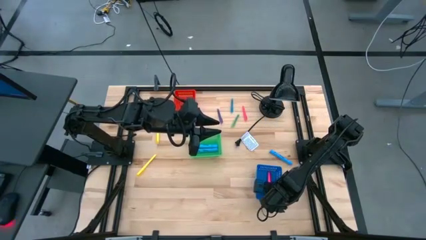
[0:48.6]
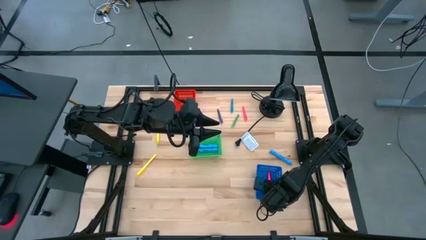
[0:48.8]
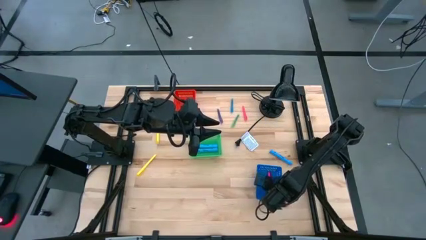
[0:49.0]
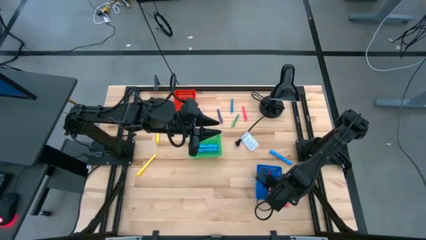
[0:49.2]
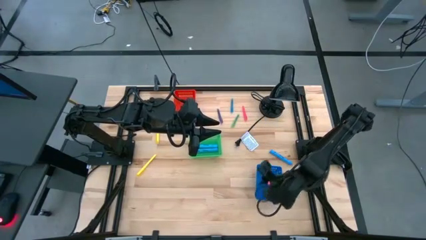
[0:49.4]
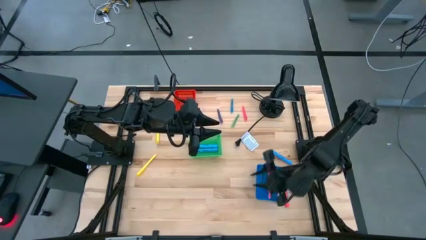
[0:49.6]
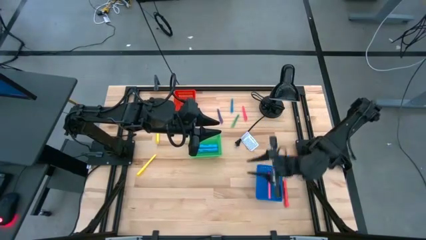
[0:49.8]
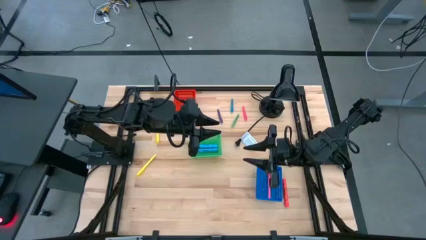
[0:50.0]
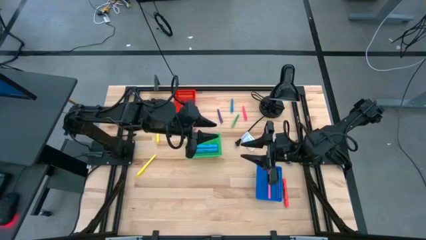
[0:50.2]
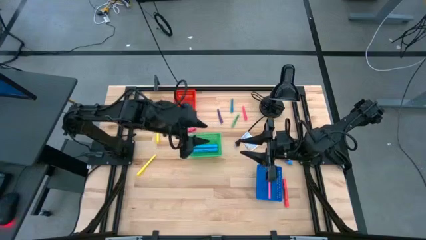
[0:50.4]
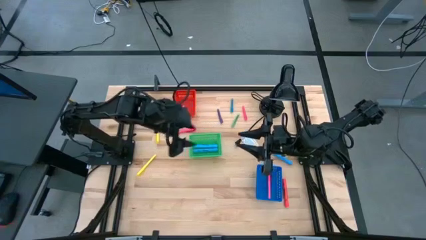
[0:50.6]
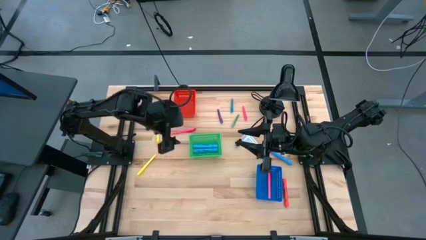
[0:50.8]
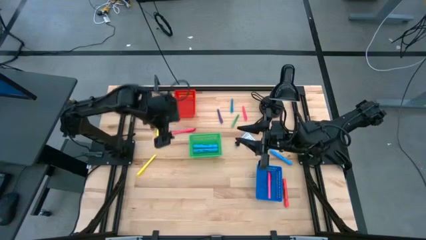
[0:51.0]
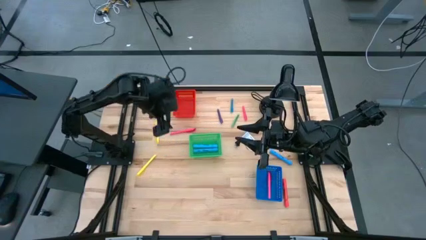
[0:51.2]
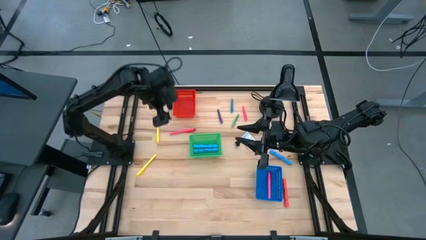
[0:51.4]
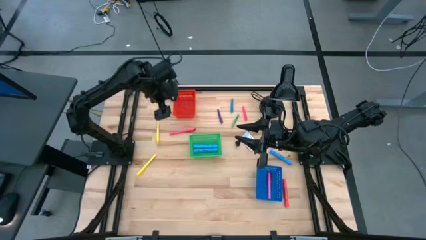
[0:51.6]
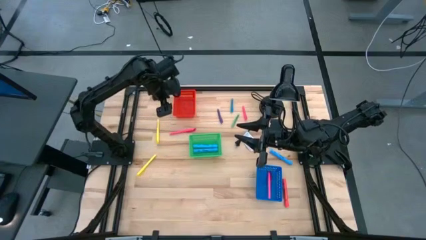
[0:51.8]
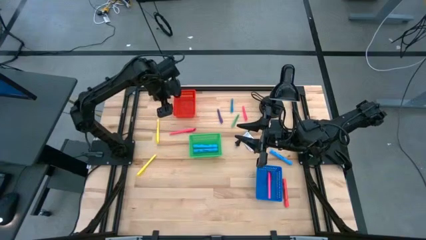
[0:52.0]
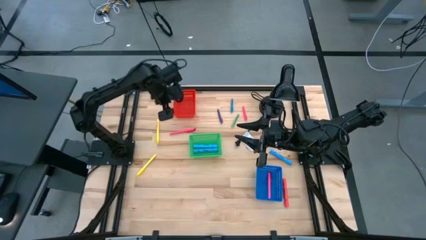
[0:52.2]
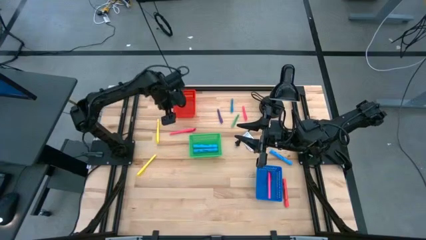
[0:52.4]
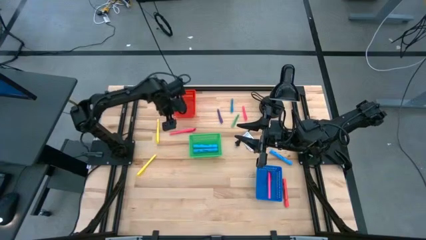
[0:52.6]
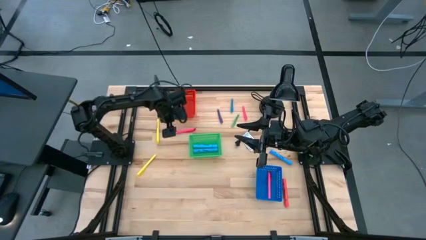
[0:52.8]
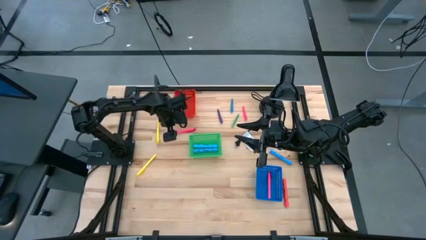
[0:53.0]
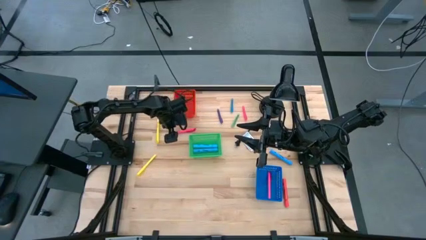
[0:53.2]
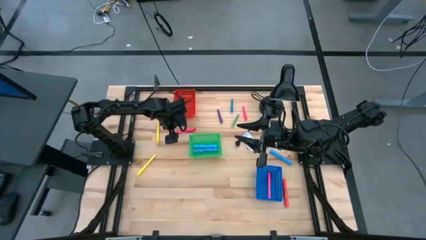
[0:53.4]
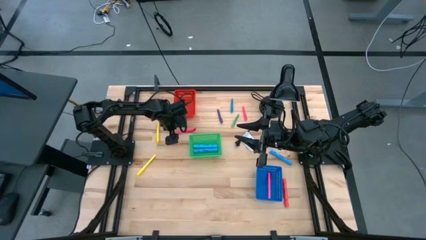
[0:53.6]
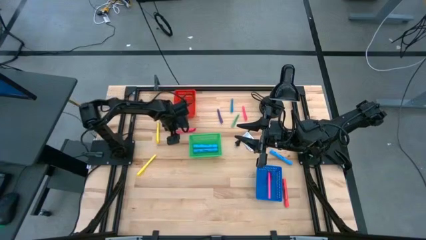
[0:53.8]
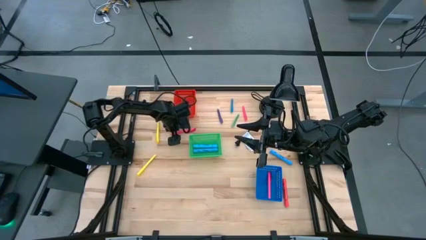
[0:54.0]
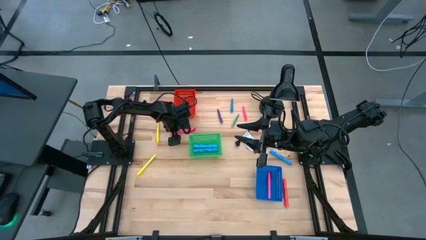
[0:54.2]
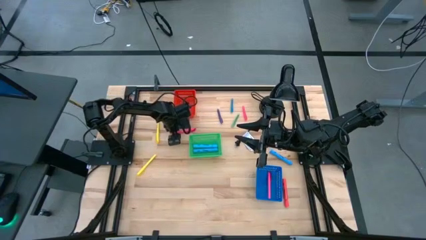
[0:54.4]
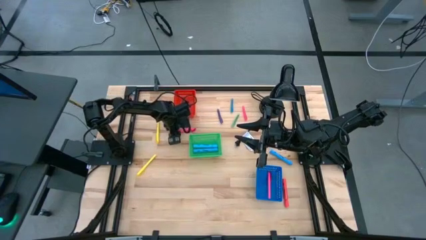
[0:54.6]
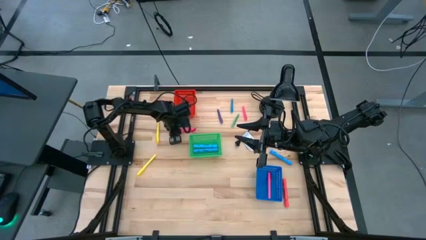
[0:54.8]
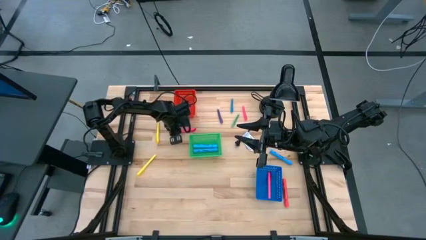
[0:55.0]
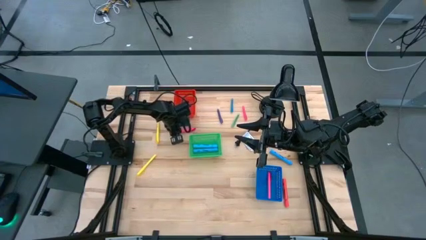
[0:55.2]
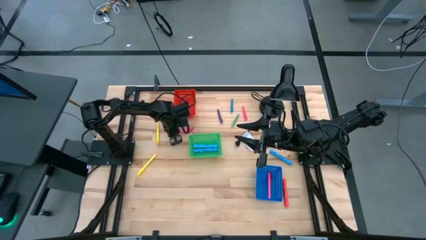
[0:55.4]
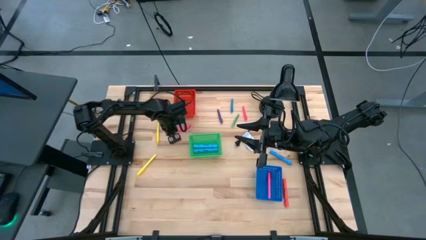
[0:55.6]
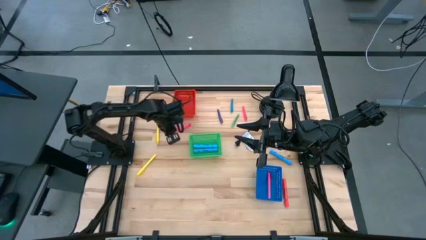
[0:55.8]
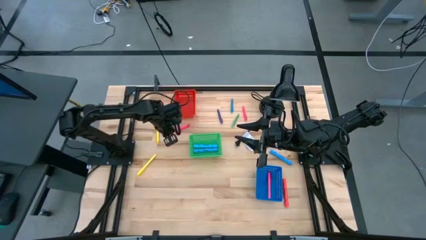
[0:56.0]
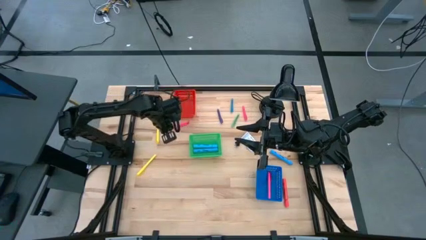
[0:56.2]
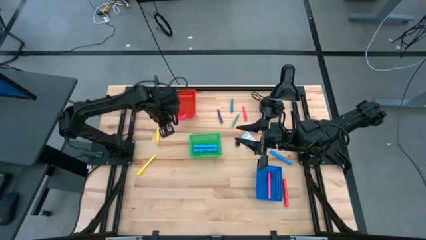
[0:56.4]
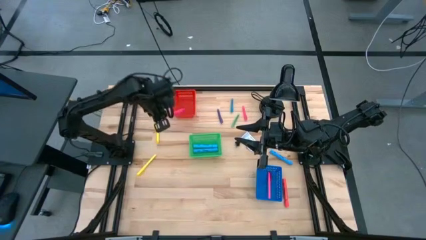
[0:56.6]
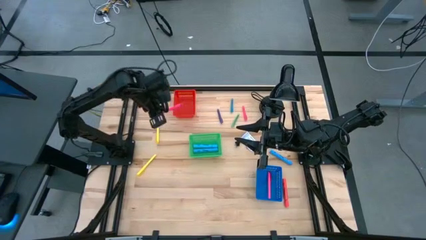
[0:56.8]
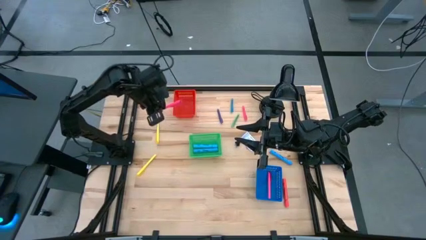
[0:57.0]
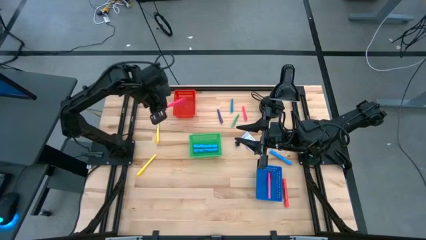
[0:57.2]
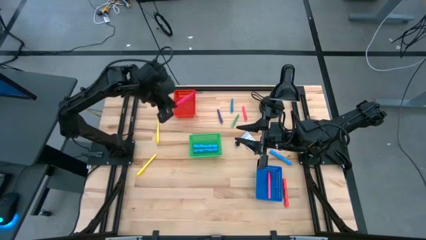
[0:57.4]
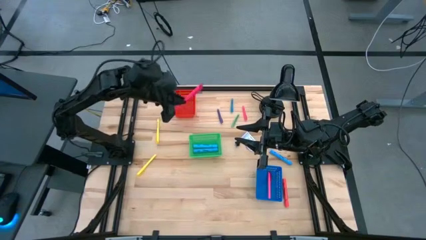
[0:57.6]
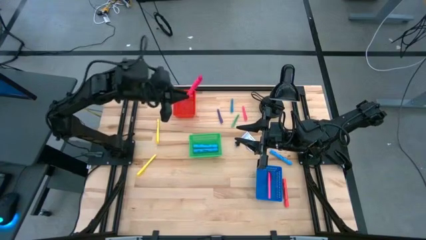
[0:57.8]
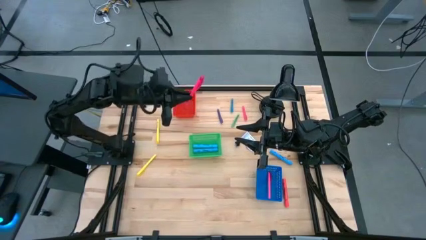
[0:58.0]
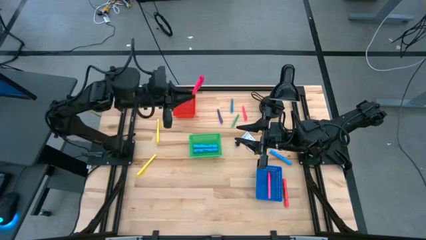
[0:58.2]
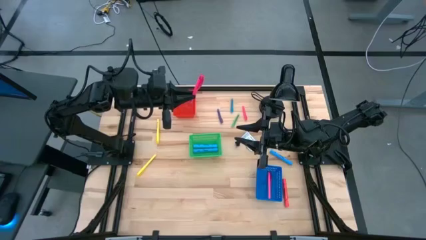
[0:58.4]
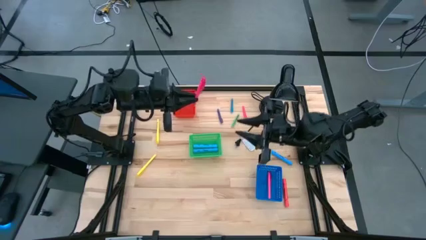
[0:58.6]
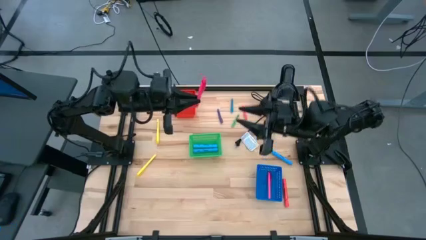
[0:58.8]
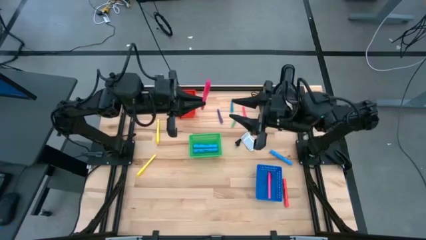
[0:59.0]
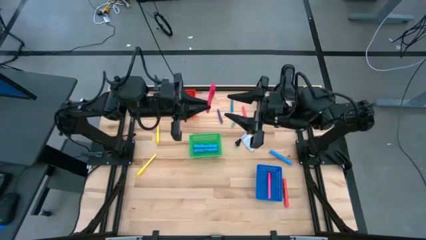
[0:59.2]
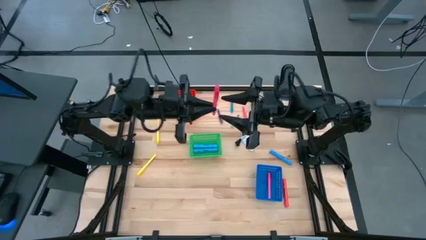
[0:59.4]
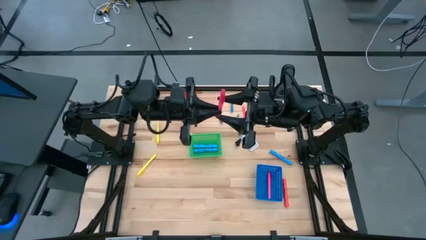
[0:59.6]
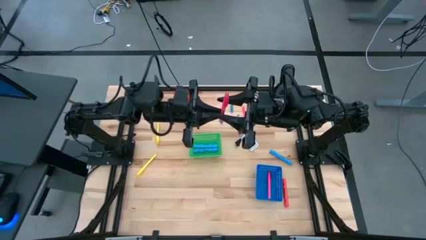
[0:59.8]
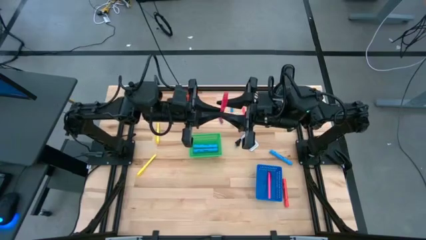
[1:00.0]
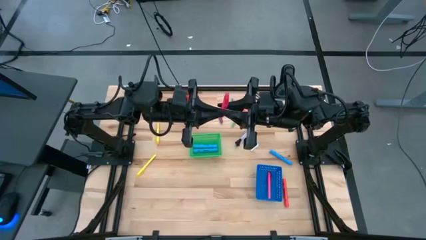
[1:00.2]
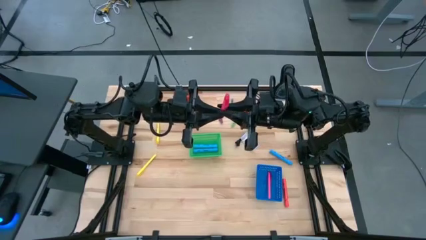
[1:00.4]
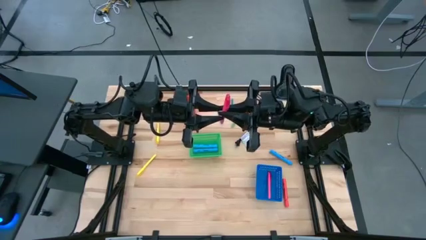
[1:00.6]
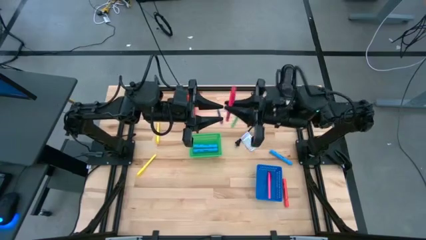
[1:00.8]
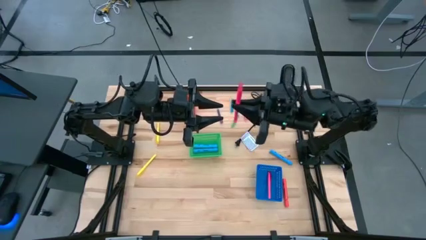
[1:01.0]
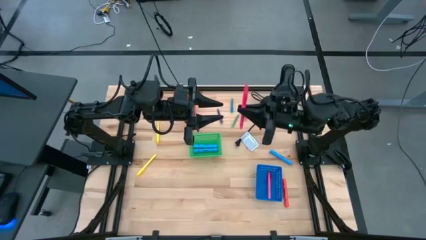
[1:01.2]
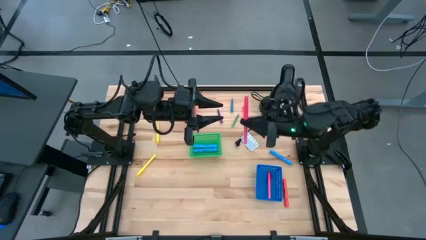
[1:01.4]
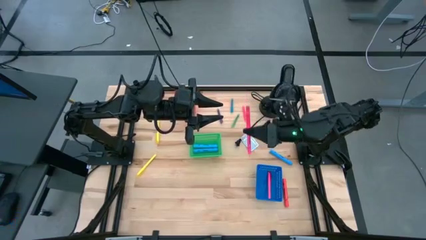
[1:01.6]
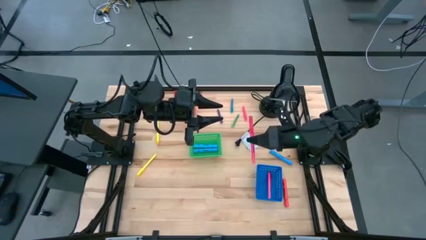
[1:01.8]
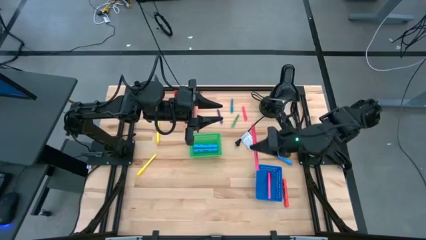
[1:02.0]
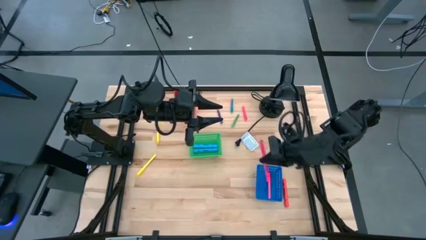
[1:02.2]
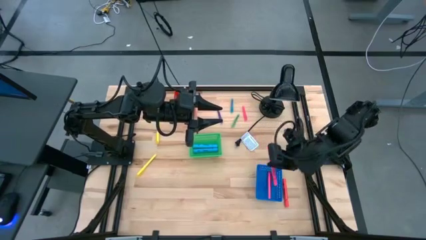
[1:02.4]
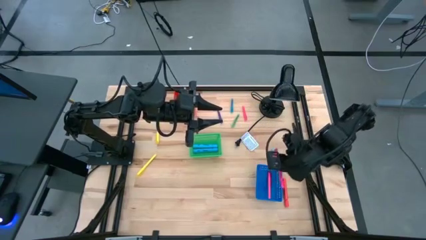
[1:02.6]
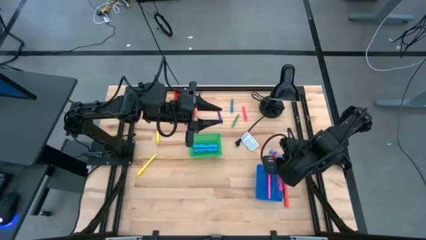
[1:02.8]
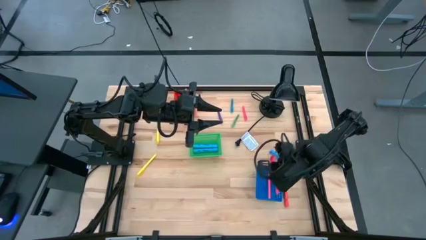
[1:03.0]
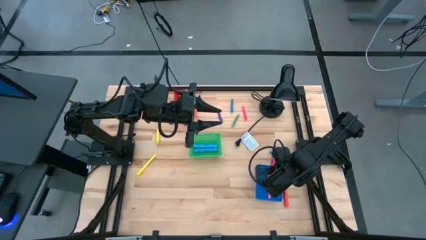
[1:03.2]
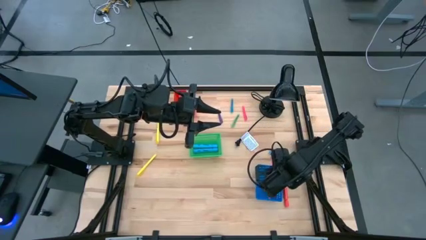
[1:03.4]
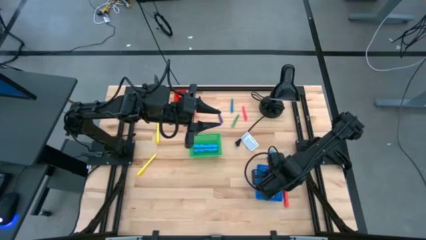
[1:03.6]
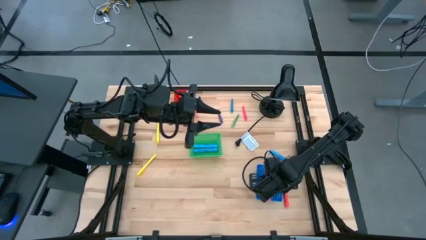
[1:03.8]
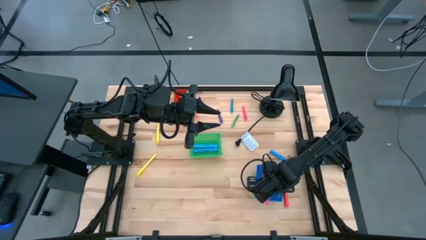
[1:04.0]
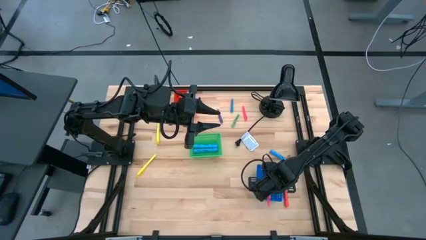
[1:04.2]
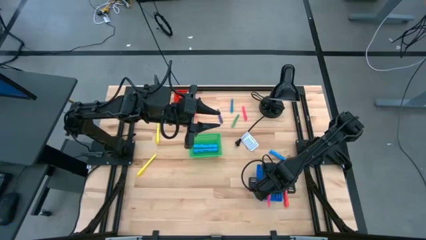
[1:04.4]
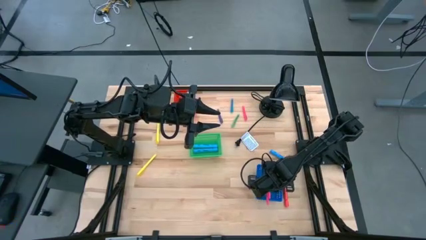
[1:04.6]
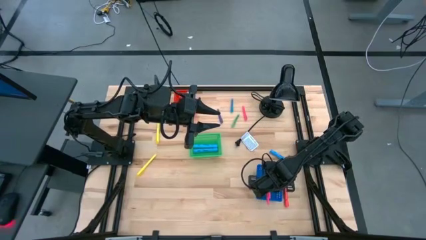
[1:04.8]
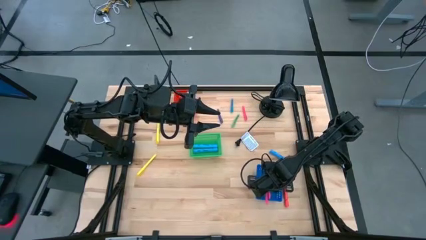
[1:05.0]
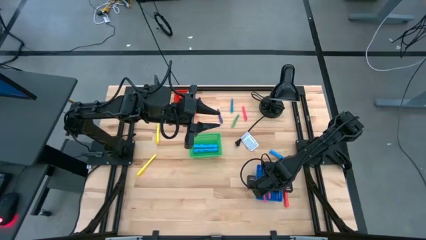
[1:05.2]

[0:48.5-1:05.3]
Task: Pick & Place Markers
Put the large pink pen into the blue bin
